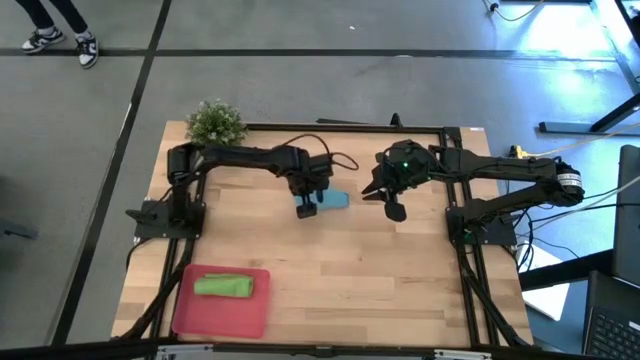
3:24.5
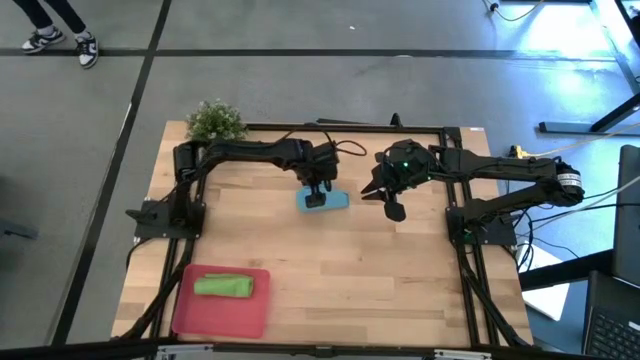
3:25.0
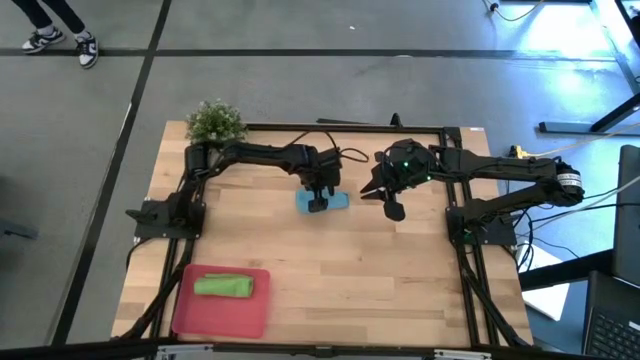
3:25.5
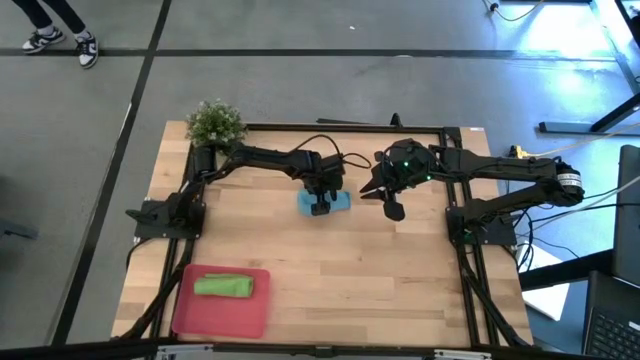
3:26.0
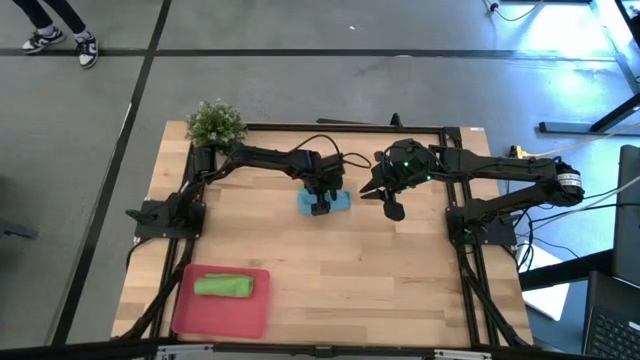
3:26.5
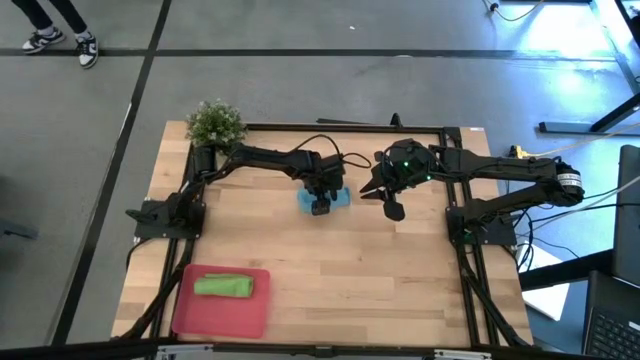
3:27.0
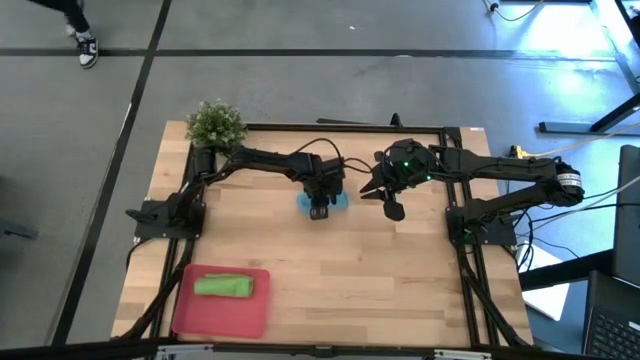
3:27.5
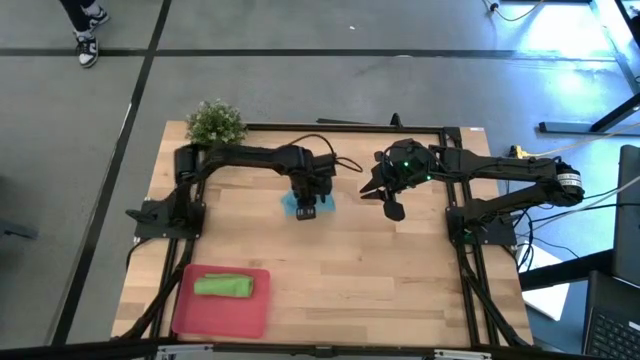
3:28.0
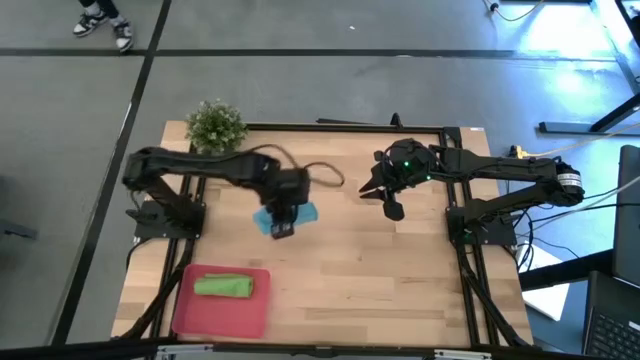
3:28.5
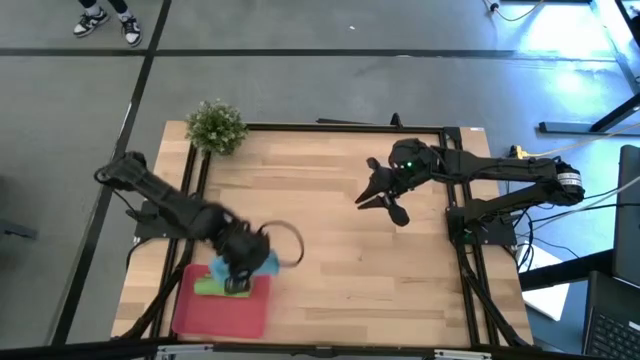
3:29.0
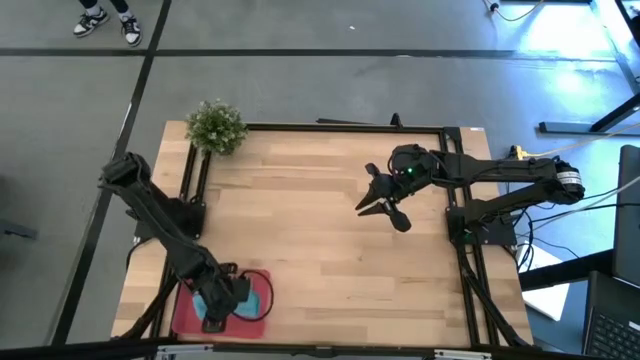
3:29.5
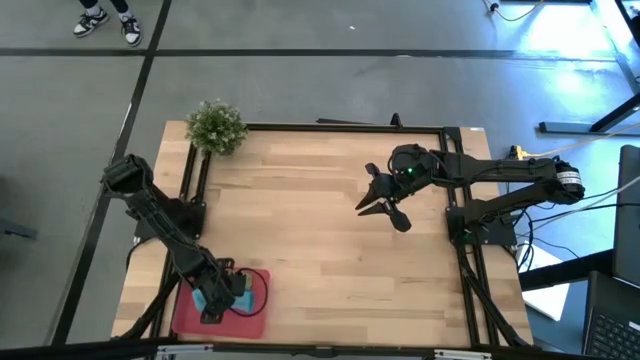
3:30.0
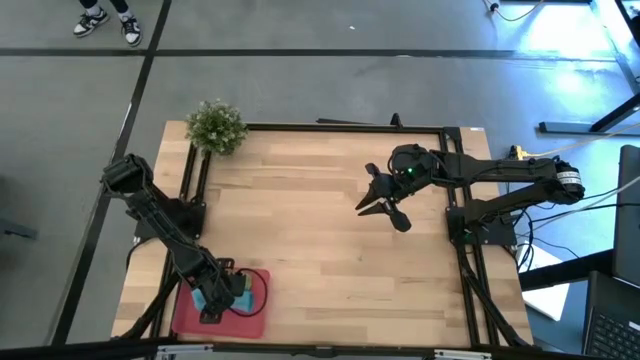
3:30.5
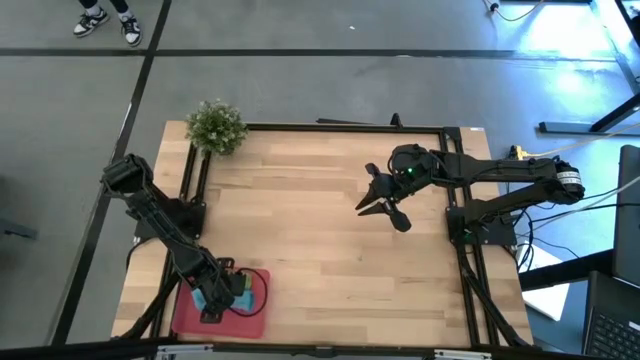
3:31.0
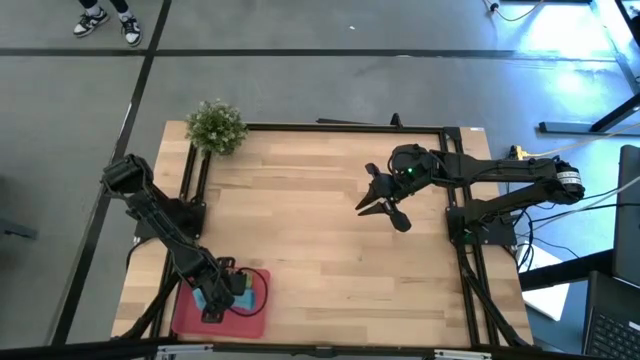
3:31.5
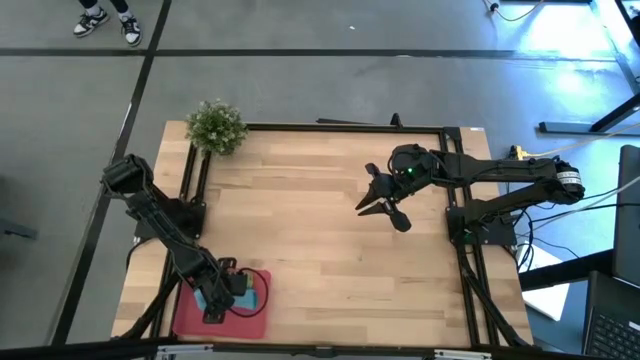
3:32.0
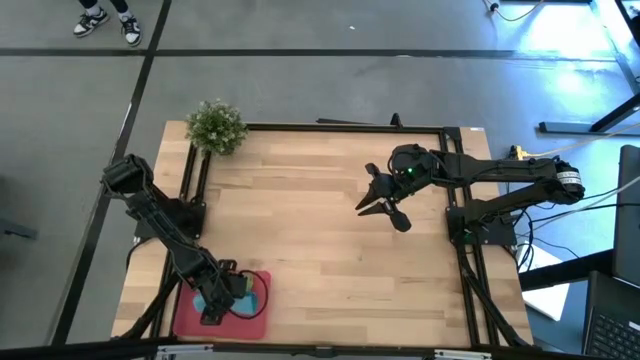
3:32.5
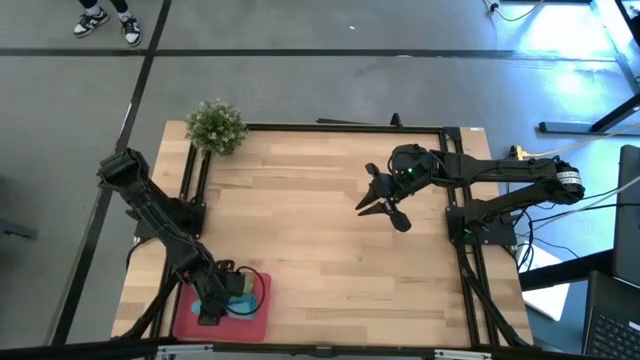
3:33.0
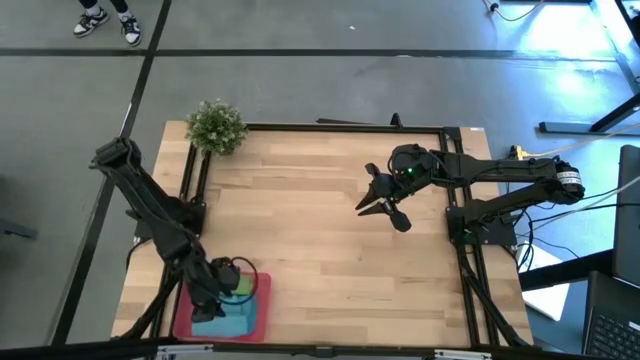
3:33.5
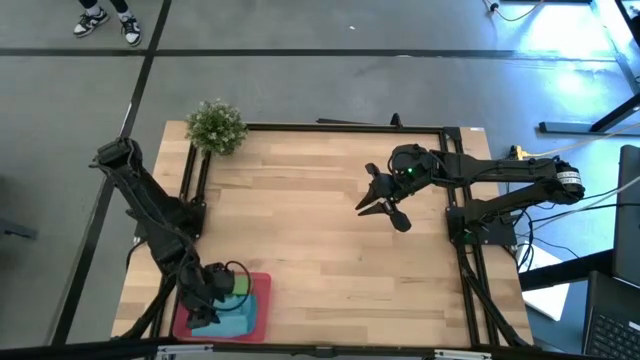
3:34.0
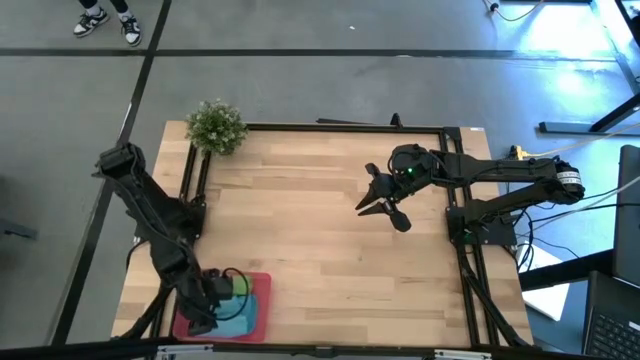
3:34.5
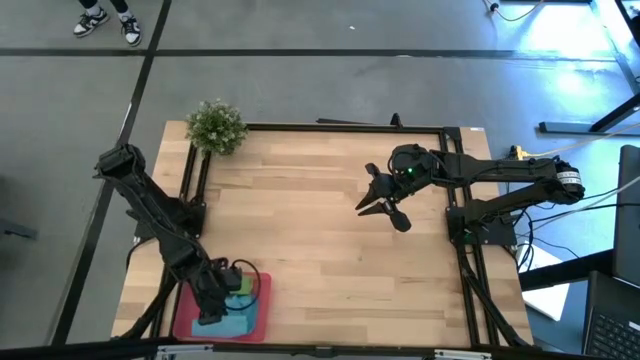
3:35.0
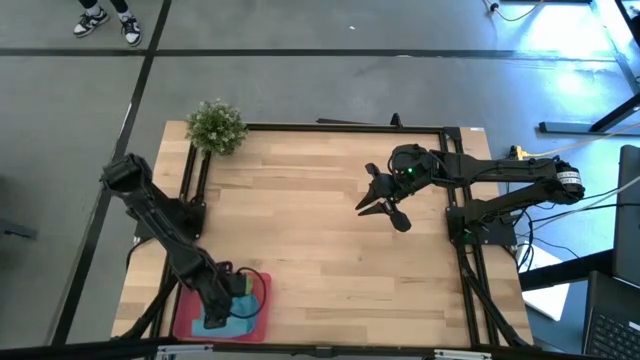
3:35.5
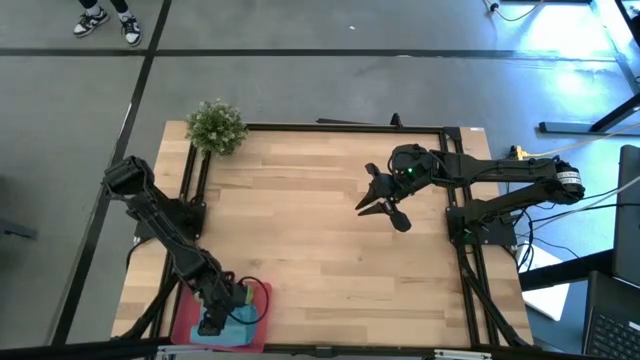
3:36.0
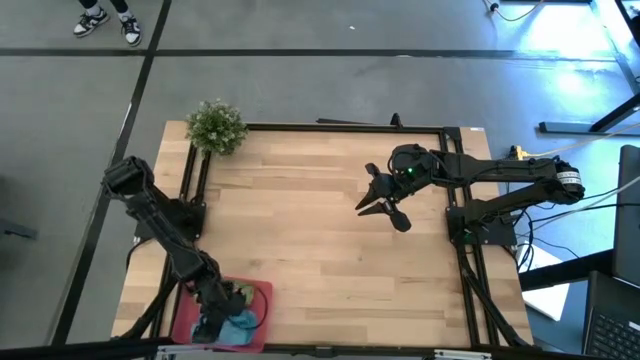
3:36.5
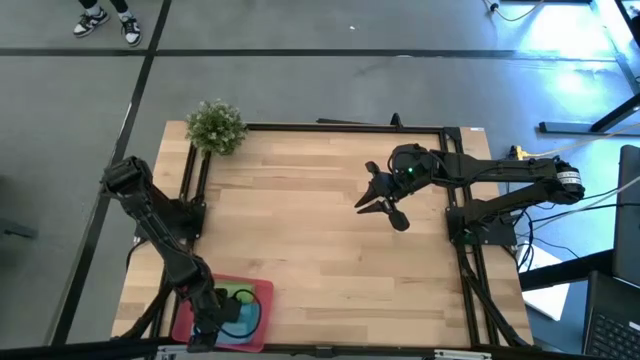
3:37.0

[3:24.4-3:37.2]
Task: Roll microfiber towels into tight, uniform cylinder then place into a basket
Put the folded microfiber blue towel into the bin

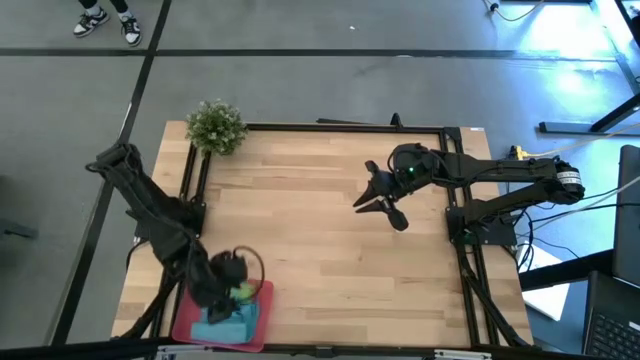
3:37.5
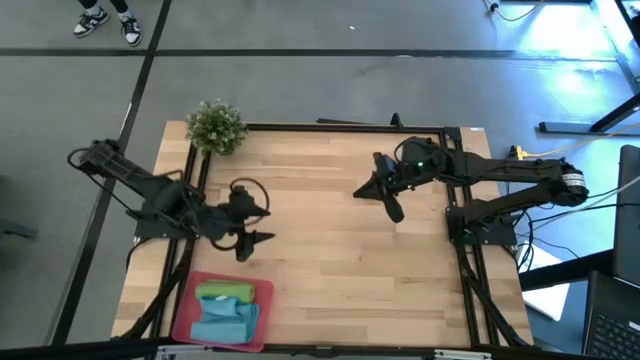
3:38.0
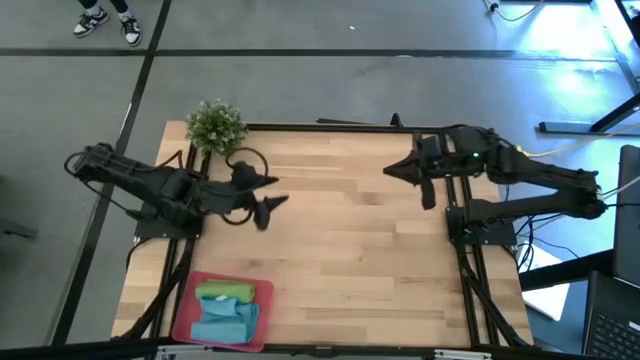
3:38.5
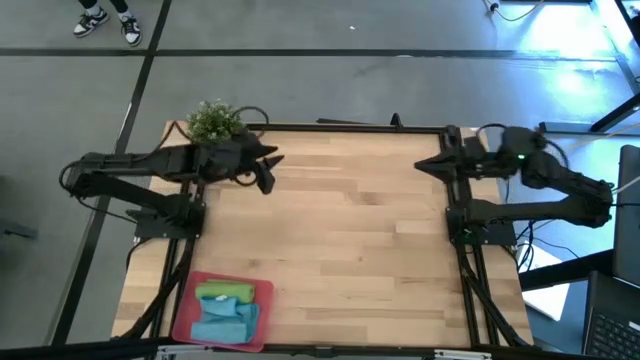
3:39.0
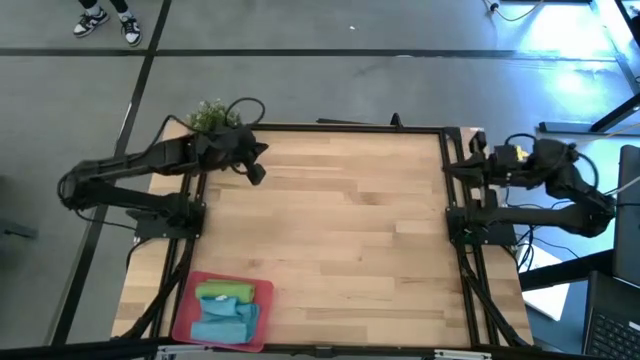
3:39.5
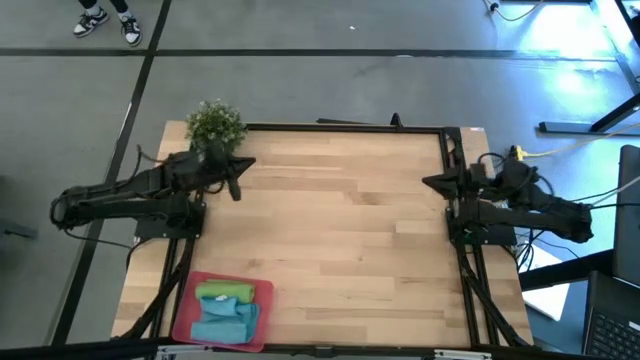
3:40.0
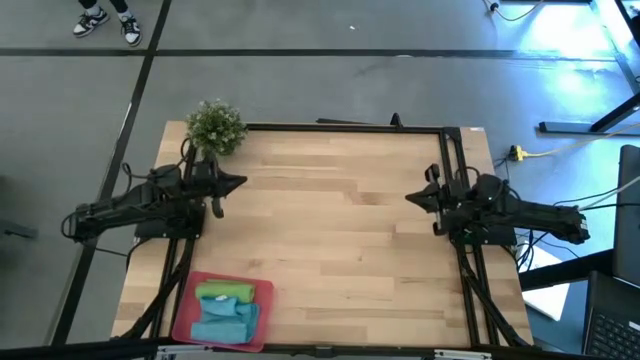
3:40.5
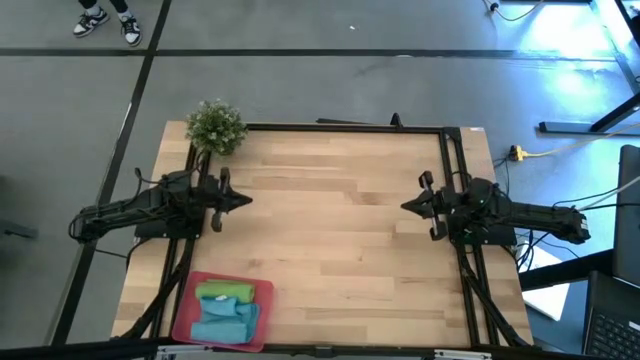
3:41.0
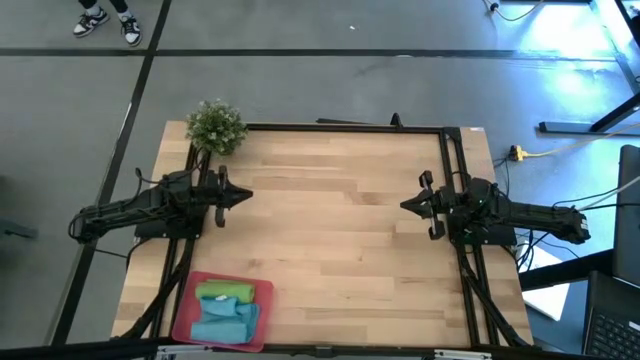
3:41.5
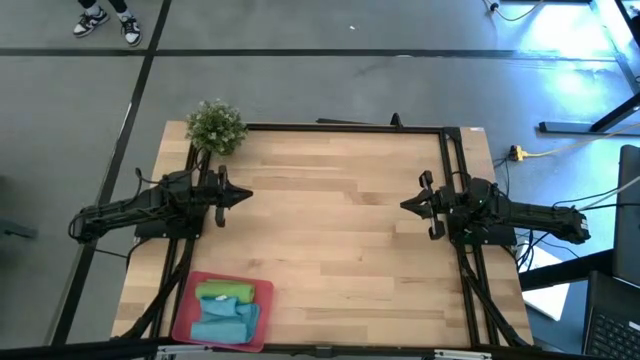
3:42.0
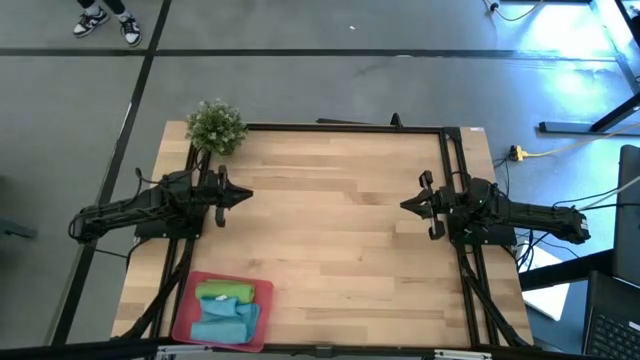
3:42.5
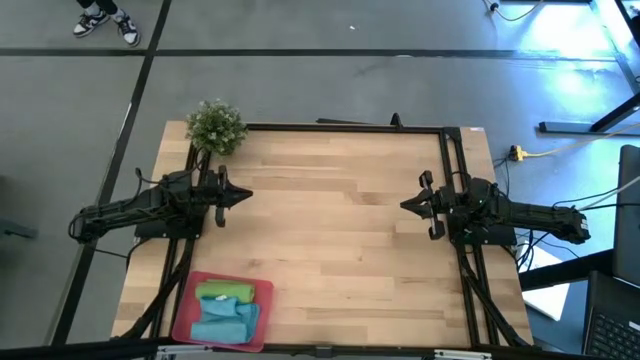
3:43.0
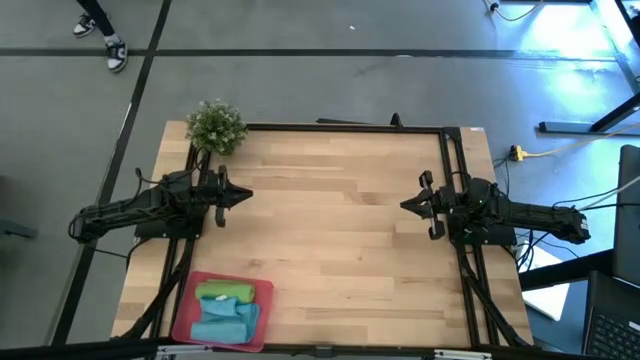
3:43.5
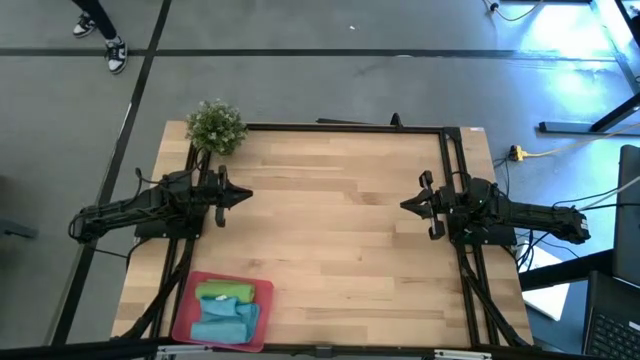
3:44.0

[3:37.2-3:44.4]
Return to Home Position
